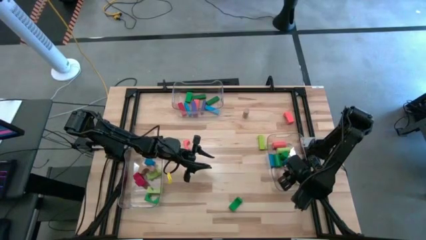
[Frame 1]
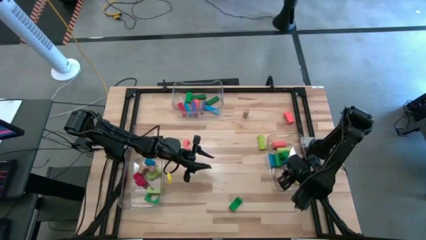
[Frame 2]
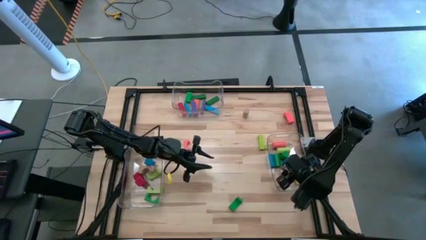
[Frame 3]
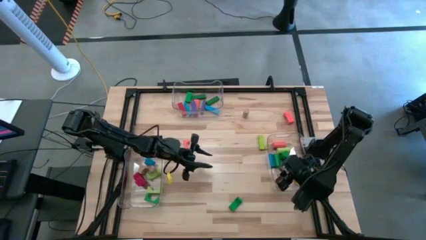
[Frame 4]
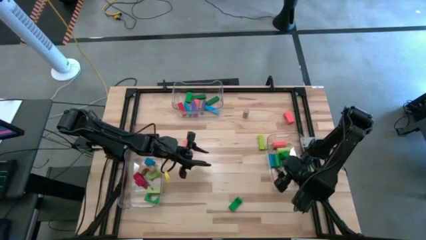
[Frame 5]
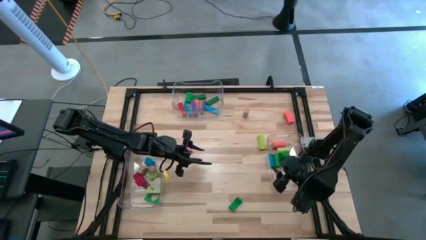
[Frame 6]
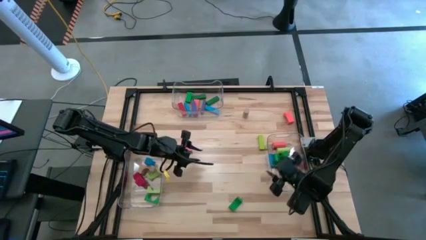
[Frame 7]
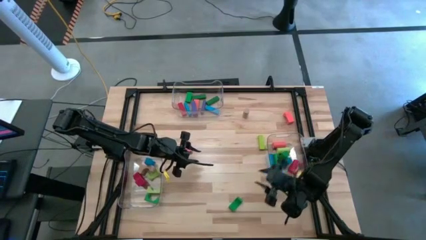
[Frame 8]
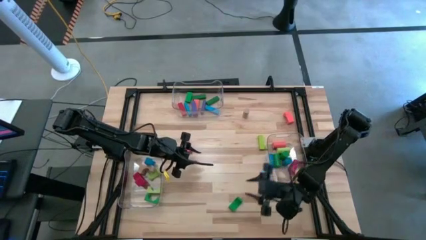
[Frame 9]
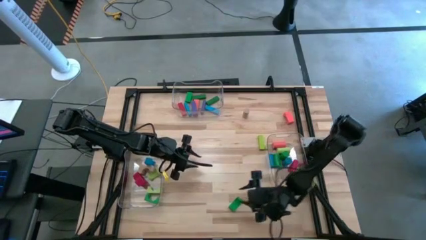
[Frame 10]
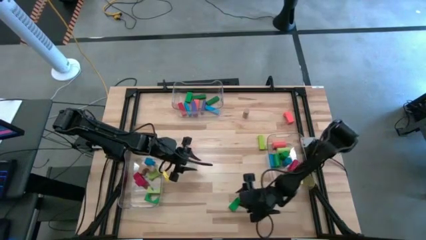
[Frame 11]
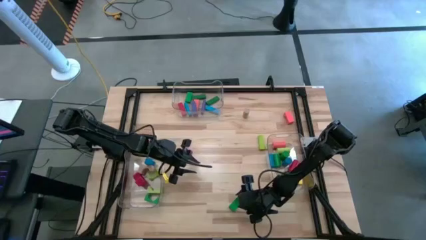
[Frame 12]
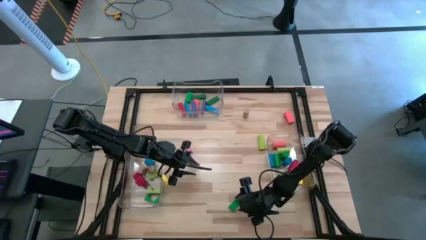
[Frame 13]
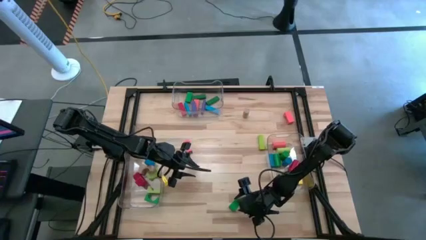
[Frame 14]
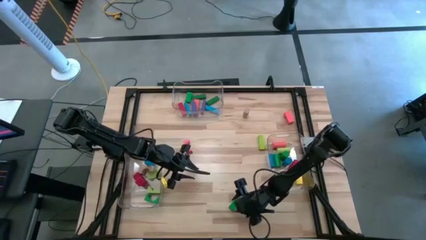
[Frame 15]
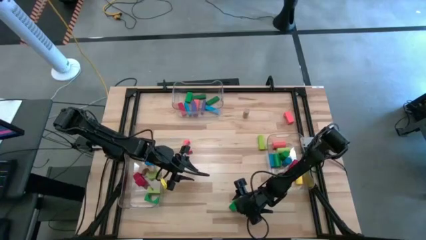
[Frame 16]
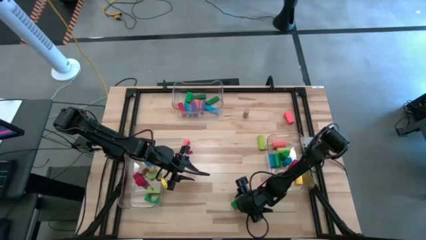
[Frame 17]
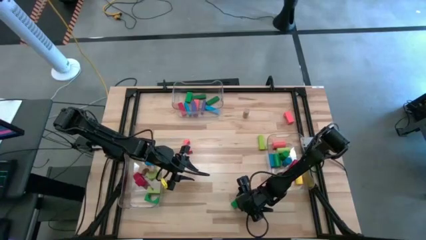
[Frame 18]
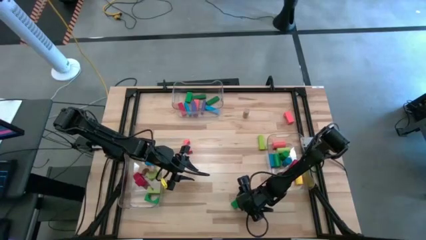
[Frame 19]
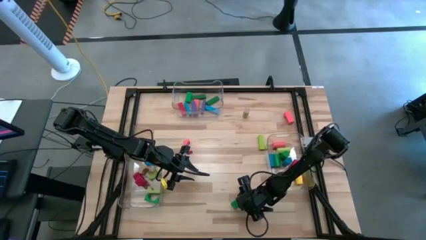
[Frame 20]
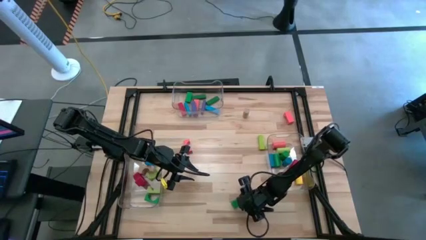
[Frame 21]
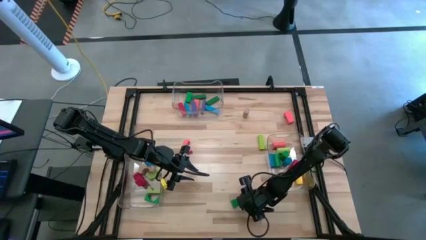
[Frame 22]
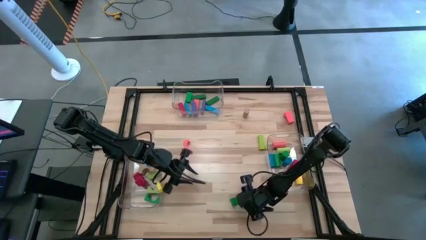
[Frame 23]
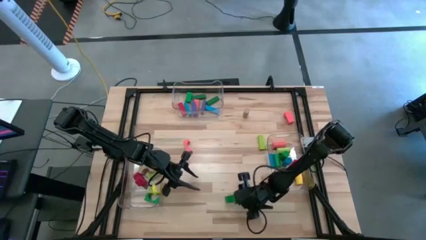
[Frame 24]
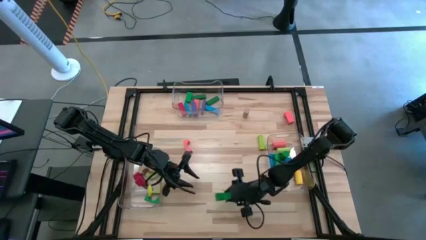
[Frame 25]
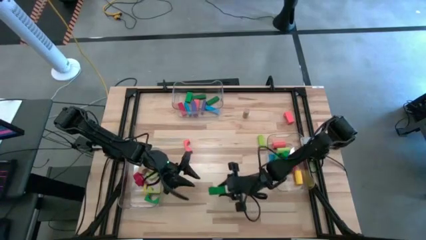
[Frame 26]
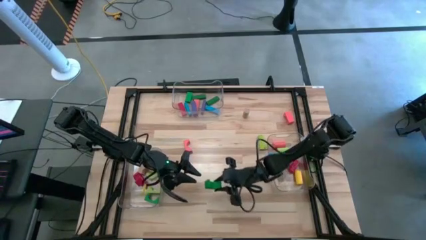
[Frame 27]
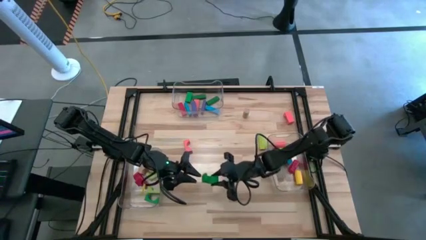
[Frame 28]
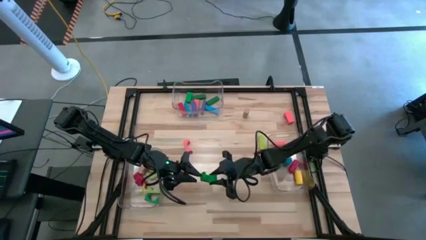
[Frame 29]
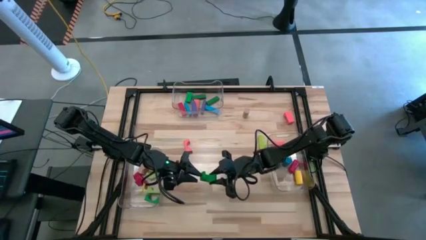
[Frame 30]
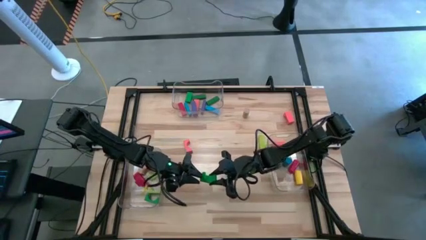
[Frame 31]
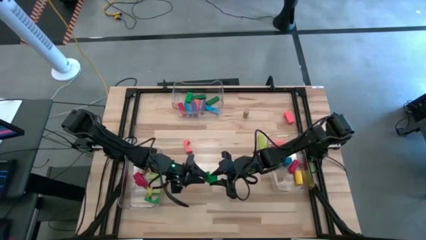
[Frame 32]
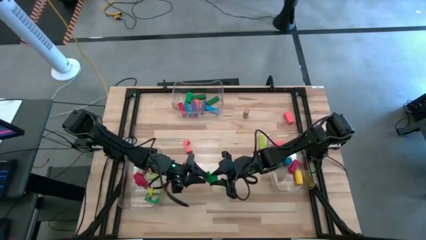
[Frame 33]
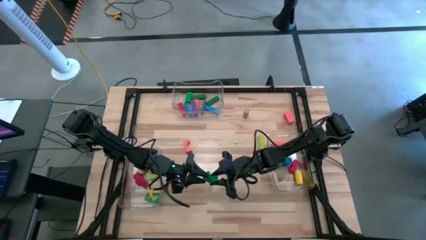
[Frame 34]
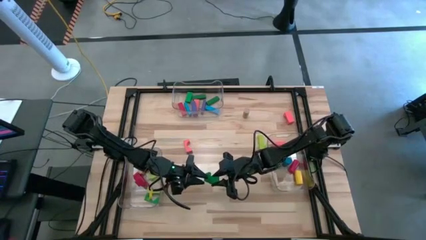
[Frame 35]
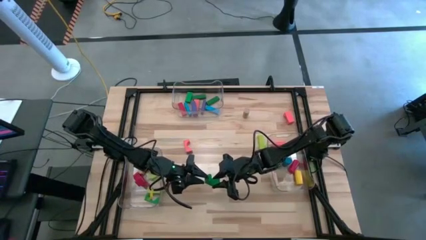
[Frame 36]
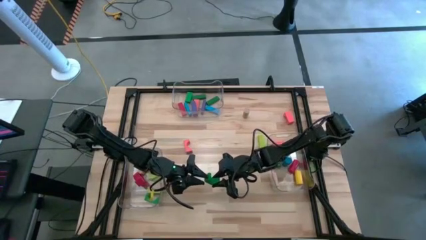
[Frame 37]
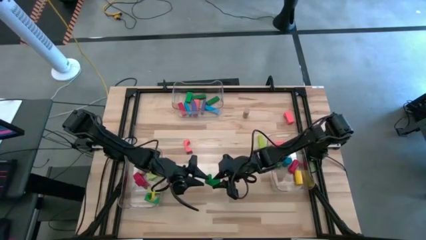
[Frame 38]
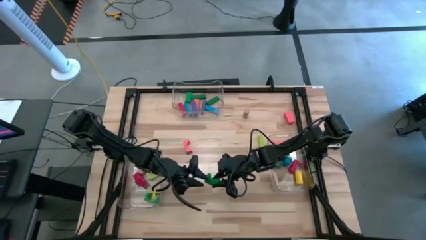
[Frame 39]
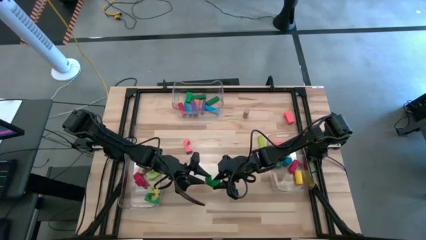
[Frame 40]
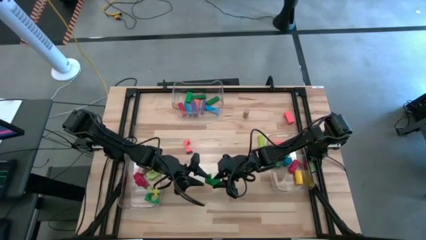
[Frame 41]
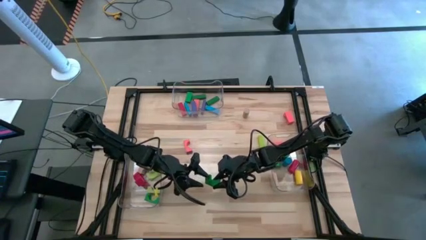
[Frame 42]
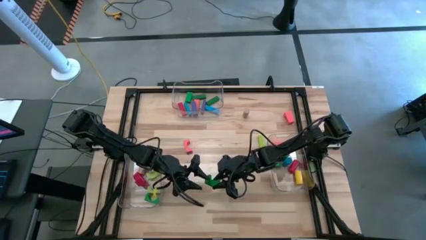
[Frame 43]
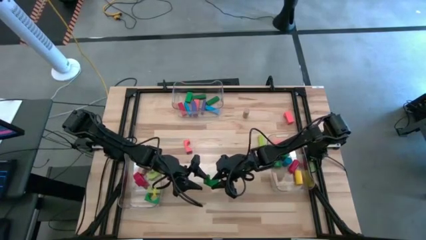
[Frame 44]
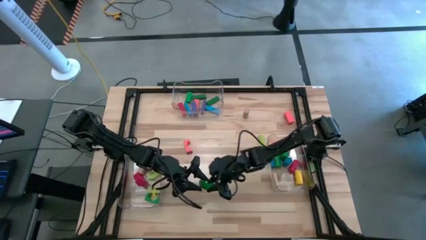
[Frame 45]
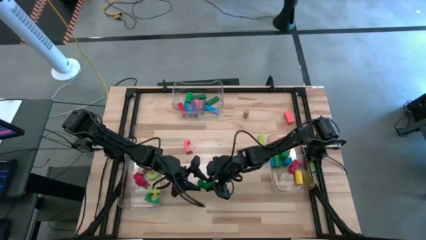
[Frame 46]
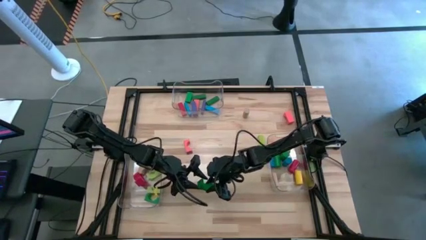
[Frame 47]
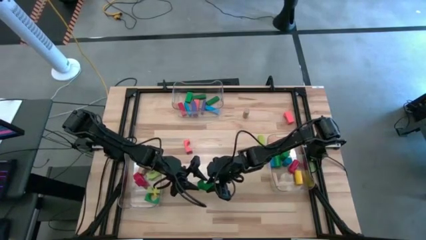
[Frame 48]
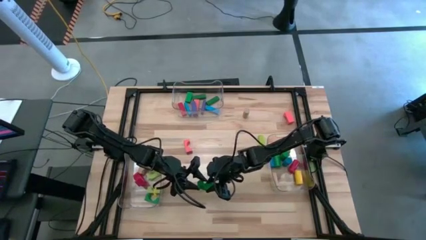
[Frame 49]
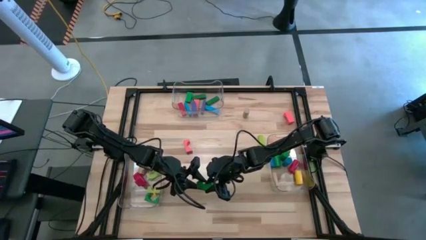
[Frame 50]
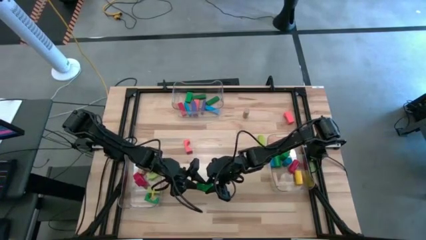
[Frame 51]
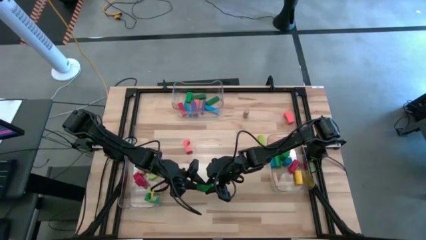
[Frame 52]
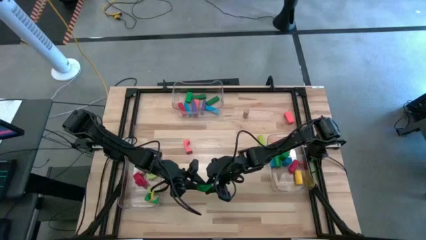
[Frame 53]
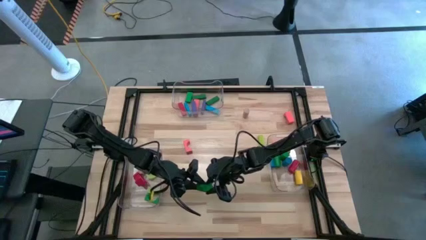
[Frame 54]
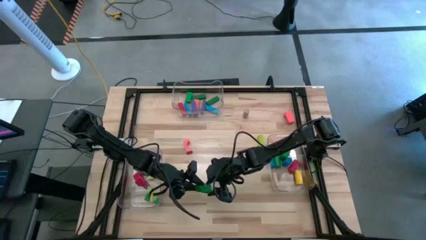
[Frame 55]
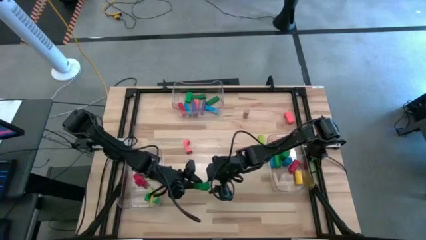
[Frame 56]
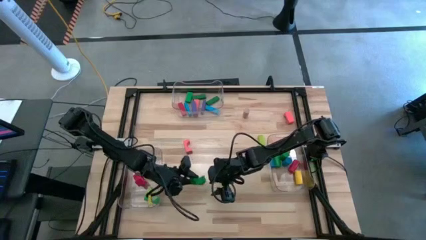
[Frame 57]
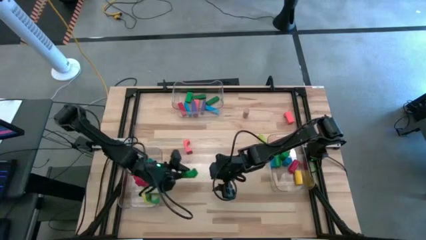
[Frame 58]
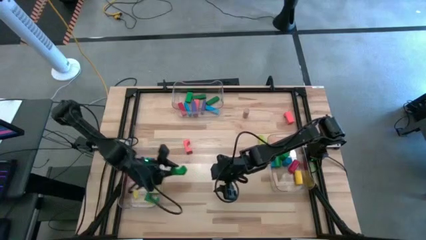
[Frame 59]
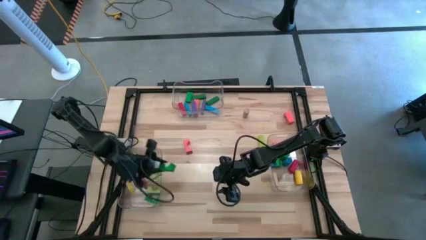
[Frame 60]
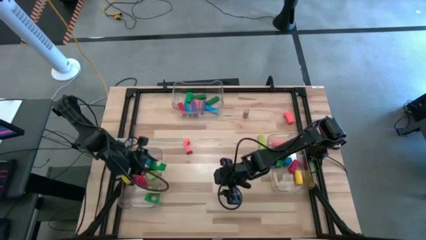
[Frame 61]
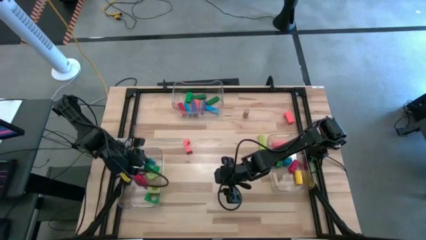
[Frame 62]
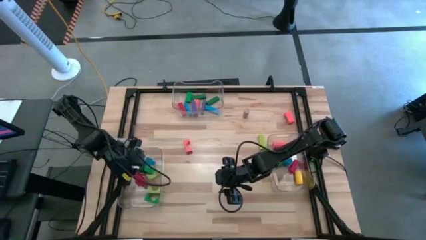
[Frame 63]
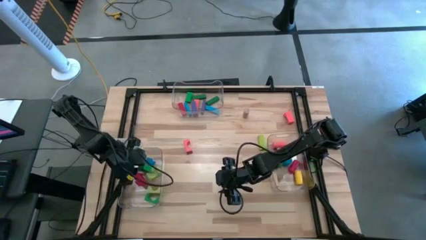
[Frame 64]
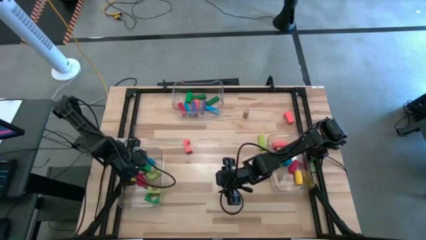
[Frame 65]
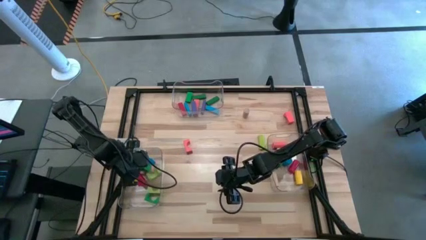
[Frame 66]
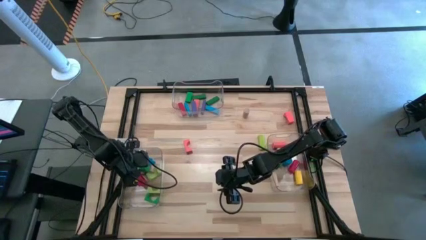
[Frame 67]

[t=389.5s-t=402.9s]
Task: Sort blocks by size
Put the green arc block into the left transparent bin
